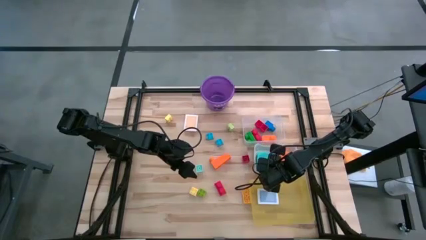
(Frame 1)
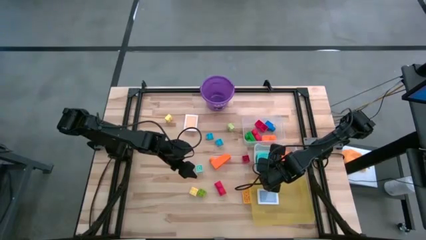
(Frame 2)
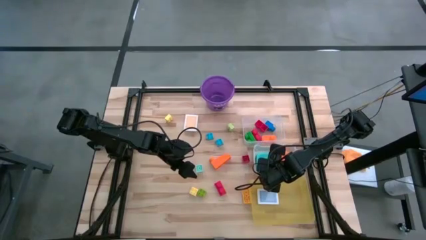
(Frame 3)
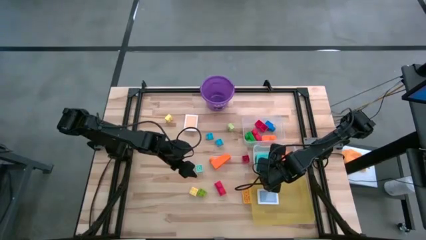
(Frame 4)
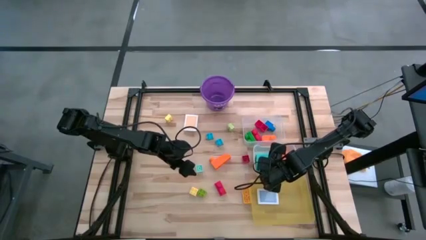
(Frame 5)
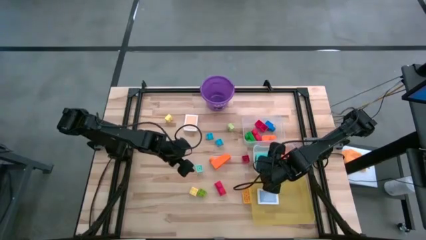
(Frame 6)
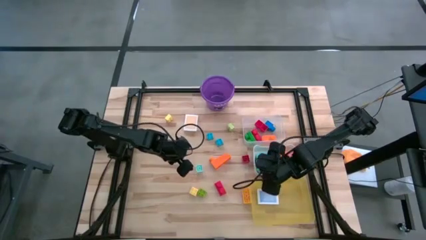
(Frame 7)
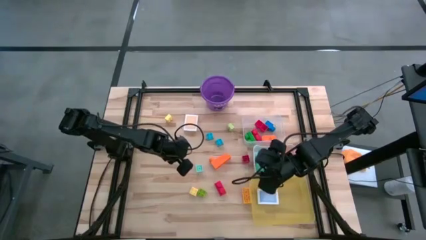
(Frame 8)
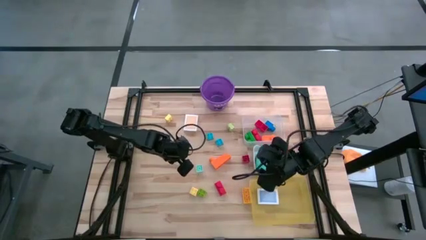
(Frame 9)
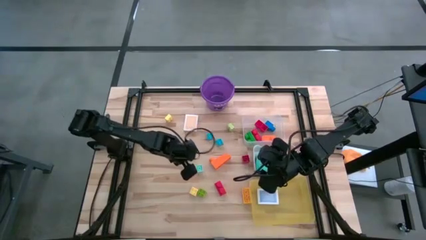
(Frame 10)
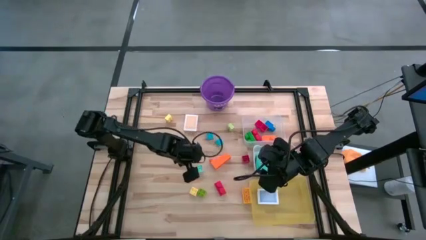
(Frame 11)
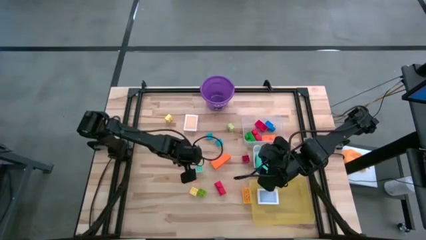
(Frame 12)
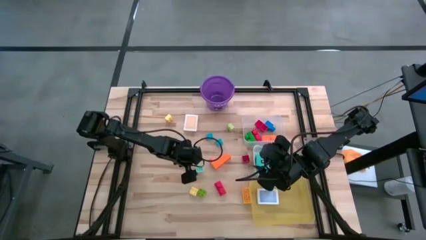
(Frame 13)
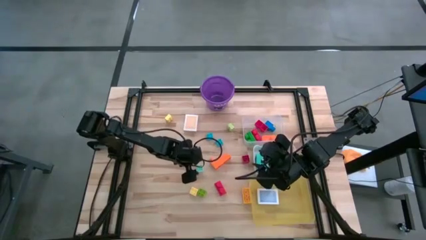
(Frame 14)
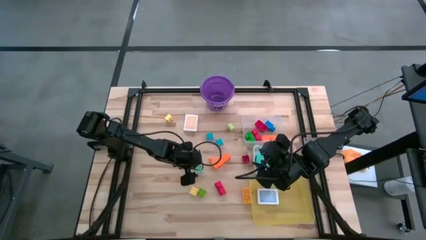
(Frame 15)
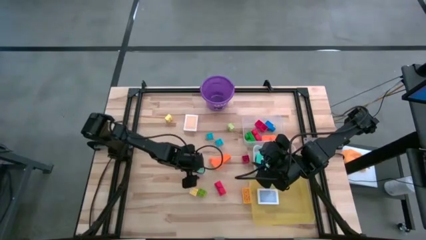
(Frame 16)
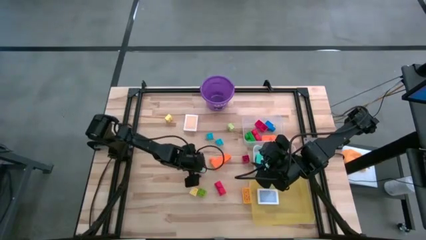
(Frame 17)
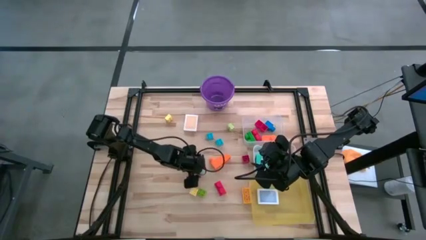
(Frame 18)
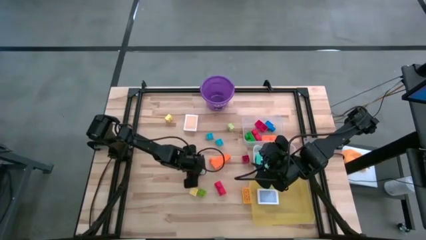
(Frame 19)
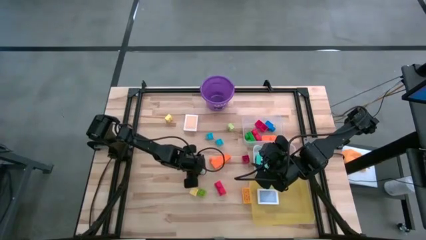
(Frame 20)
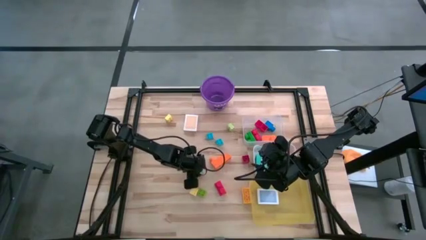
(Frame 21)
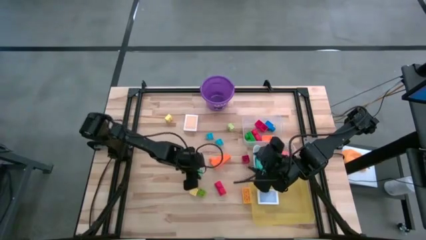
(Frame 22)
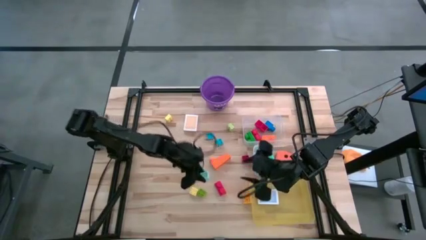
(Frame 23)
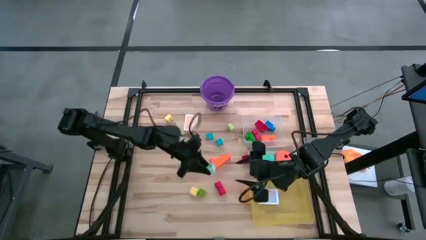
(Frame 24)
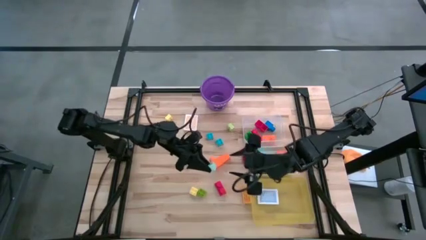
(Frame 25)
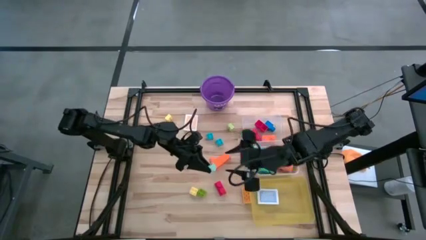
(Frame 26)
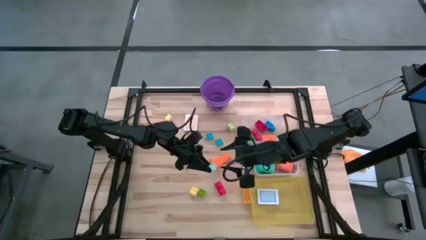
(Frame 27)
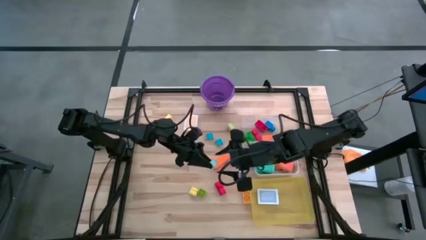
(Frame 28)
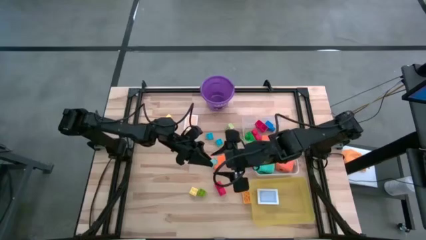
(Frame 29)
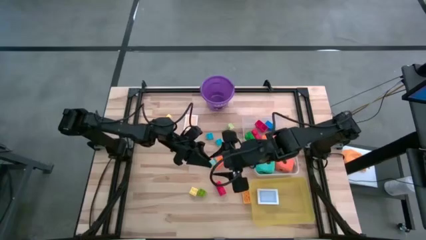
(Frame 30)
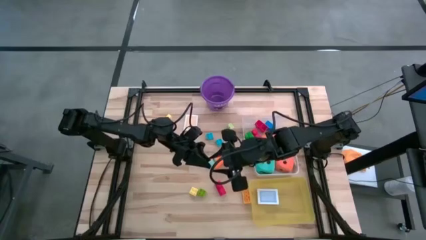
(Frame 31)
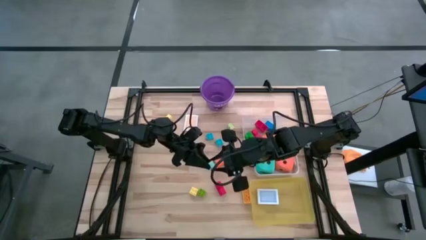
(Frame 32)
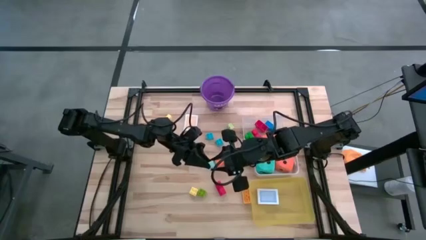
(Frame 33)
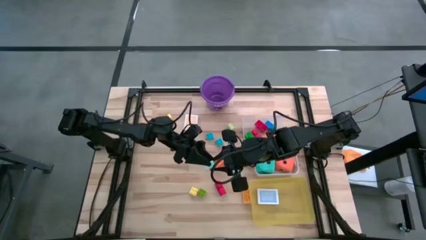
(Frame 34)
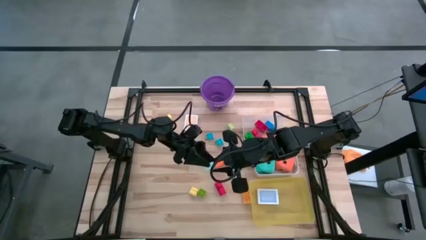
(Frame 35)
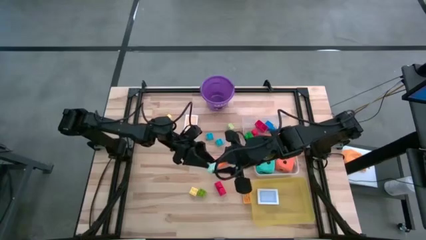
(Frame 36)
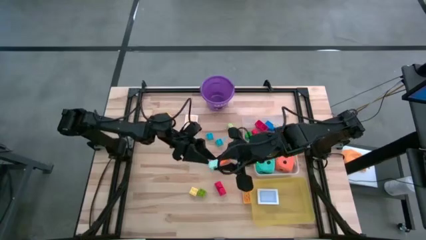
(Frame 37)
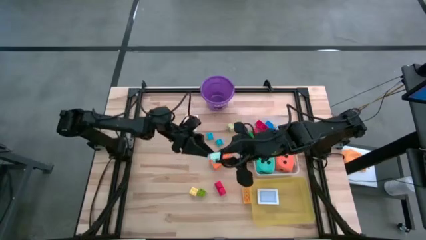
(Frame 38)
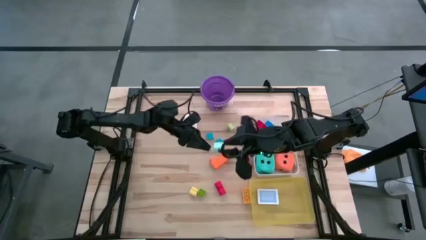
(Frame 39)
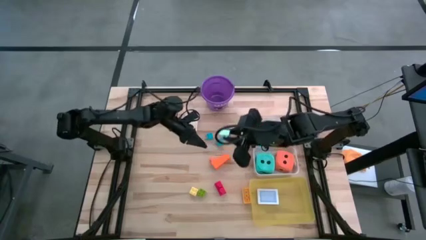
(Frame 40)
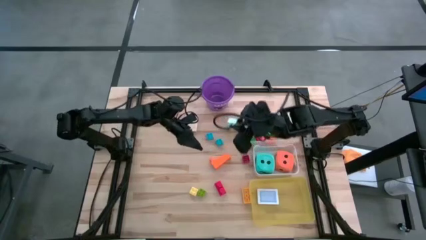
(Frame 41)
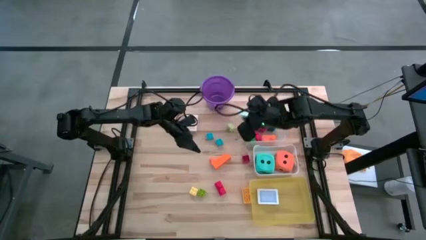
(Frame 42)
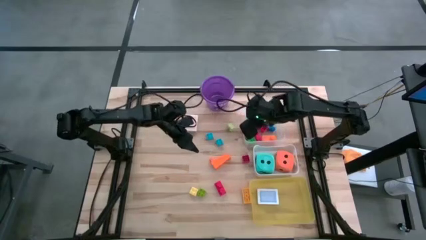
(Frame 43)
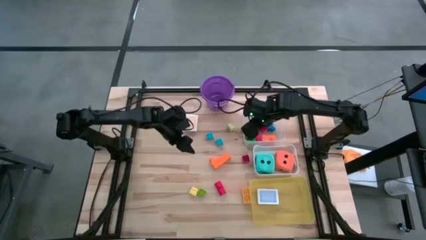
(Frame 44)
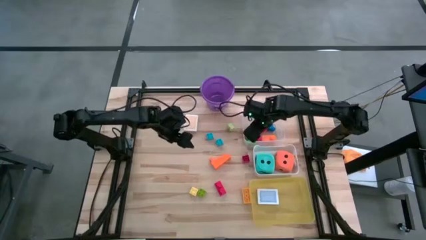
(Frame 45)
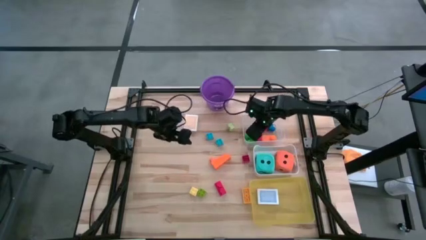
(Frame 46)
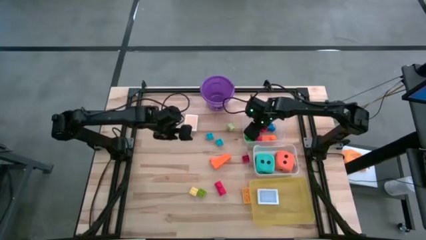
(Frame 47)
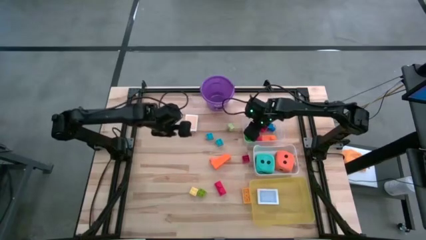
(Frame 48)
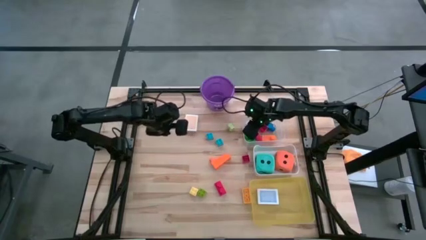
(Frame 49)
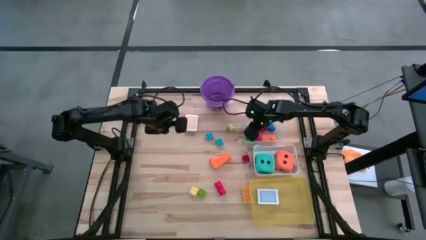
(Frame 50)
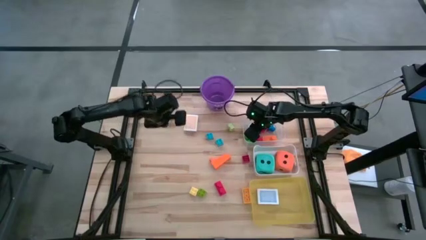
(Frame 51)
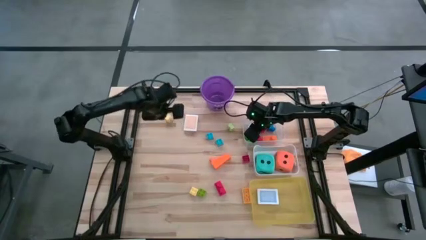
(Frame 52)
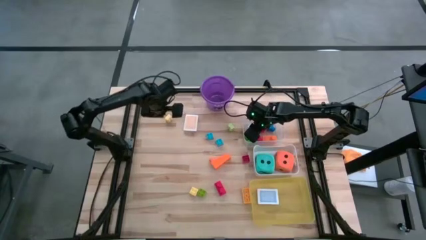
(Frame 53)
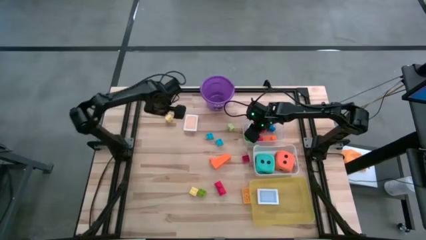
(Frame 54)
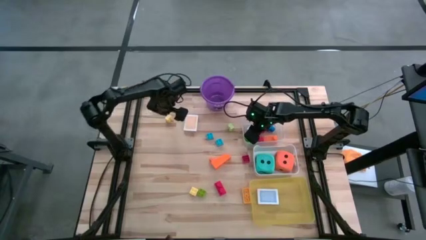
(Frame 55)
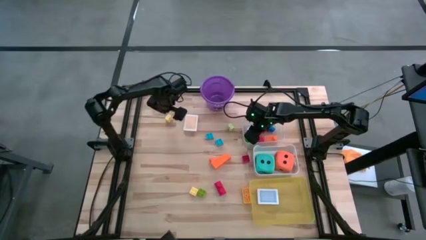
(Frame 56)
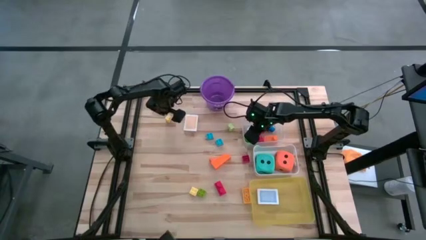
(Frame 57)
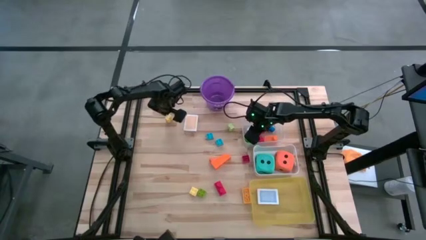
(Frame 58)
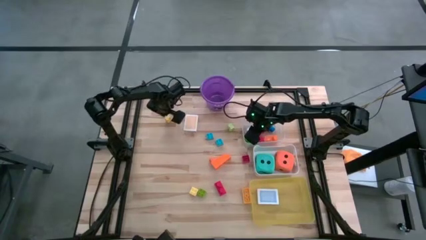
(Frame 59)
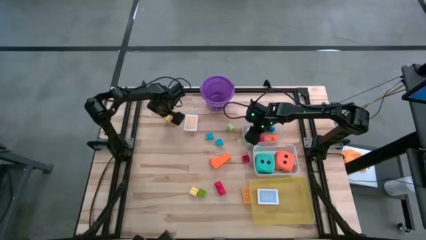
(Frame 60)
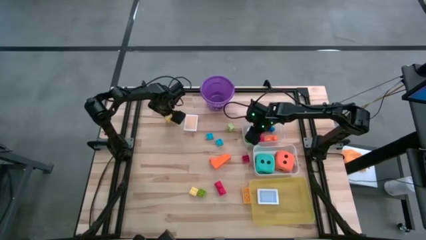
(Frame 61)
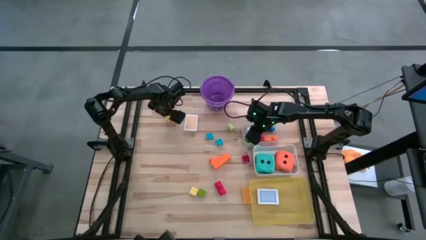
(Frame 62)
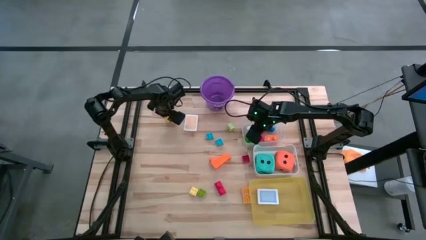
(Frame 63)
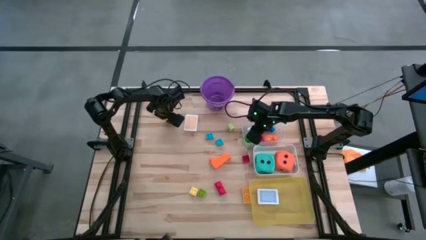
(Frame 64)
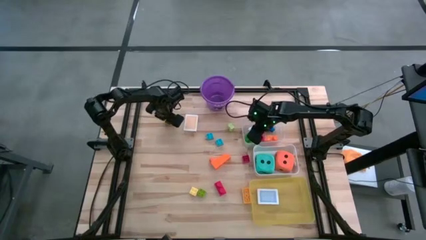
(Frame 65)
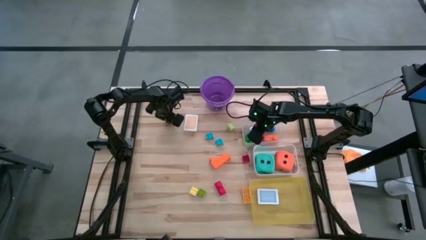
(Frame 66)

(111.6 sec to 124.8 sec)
Task: Pick & Place Toys
Put the light blue game piece into the transparent bin

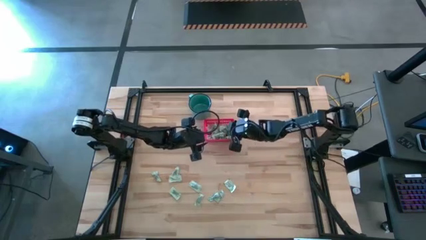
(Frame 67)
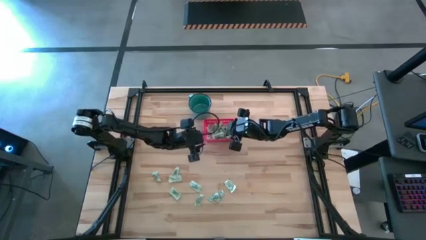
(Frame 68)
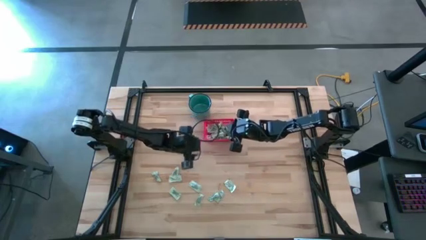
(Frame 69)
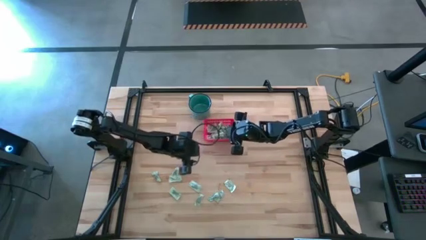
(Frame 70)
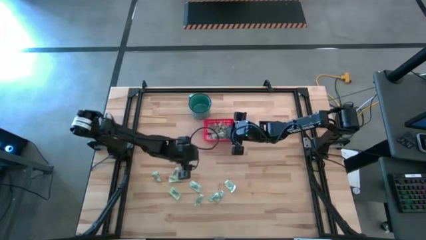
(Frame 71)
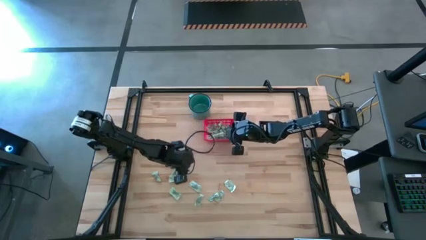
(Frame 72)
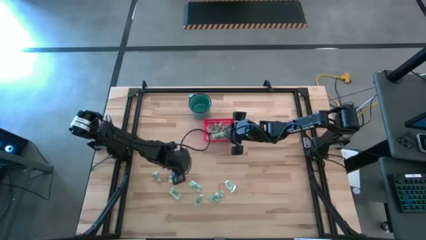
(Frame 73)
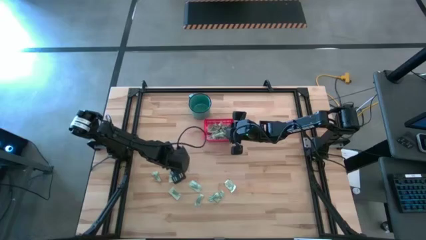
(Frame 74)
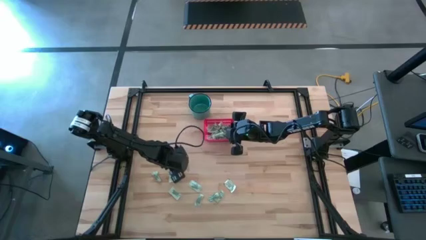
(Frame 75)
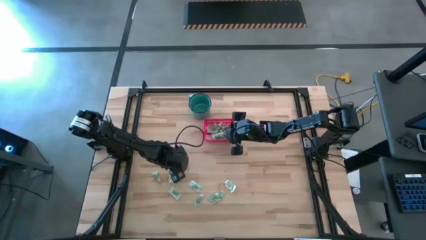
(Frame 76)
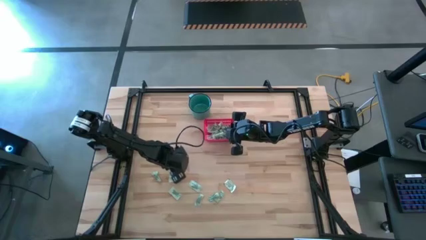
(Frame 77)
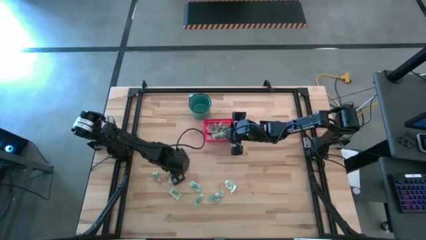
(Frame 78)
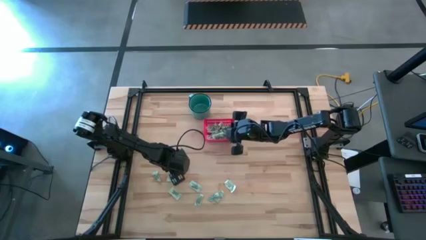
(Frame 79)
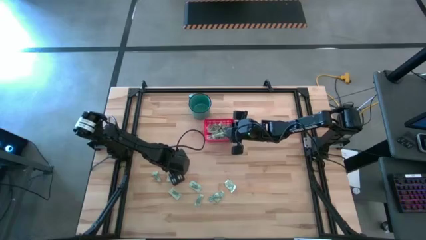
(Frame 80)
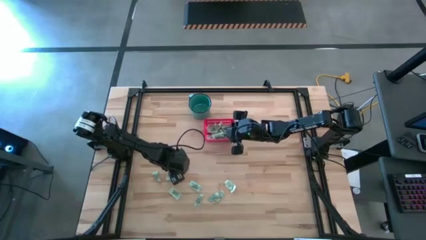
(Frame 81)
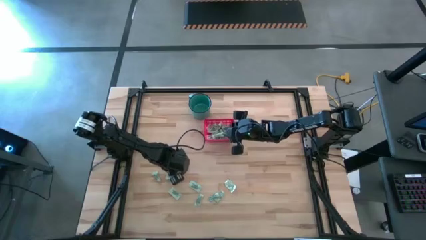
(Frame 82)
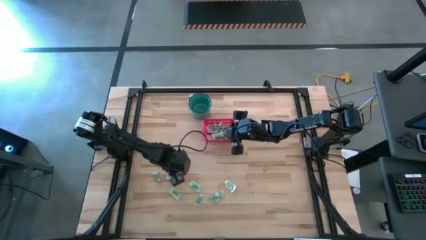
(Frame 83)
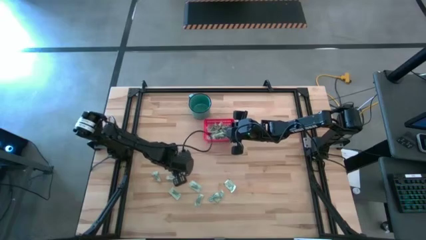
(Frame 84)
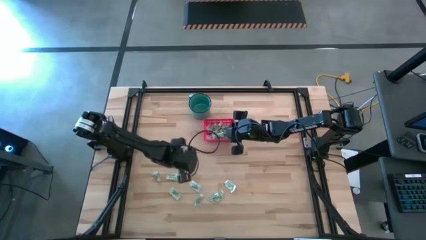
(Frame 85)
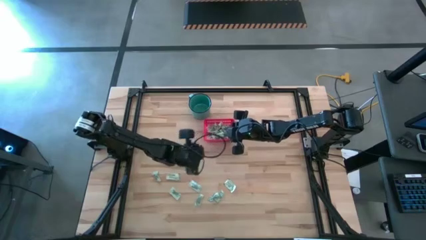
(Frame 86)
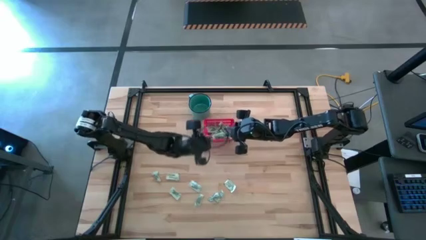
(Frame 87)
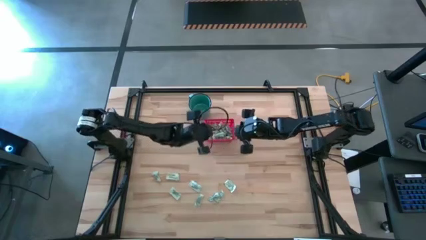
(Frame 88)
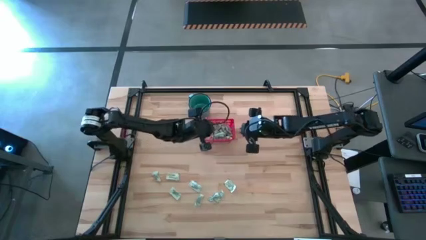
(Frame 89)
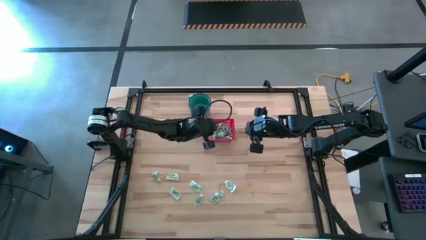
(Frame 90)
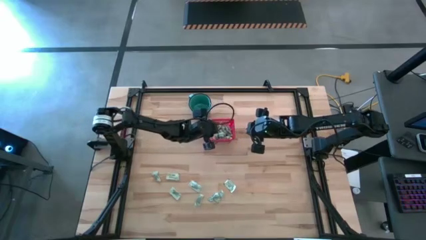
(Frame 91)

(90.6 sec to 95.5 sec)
Task: Pick and place items into bin
Put the light green stevia packet into the red bin
